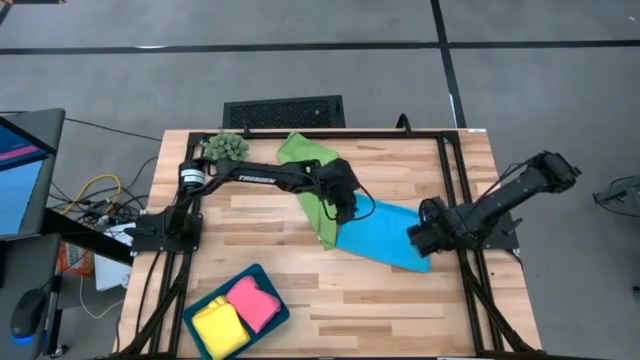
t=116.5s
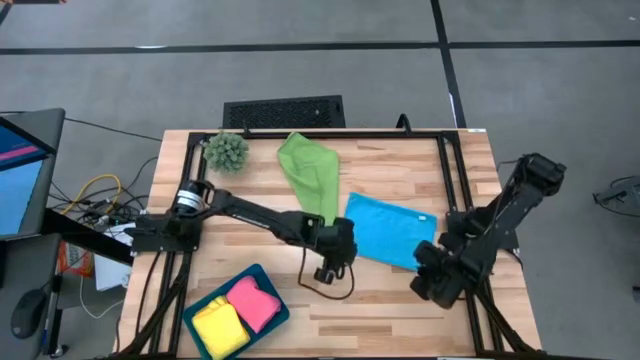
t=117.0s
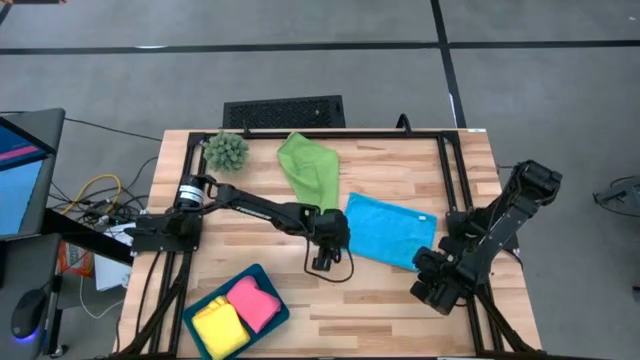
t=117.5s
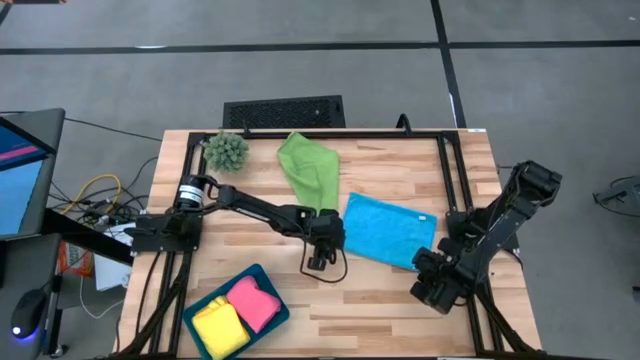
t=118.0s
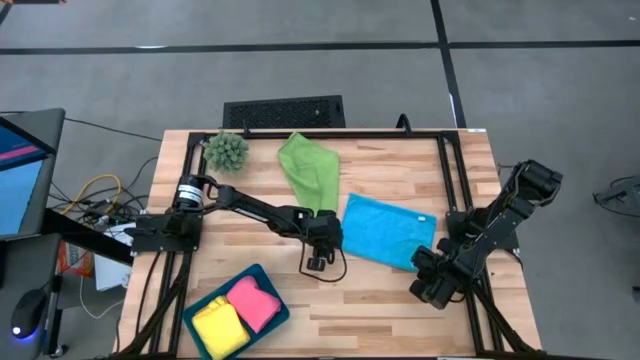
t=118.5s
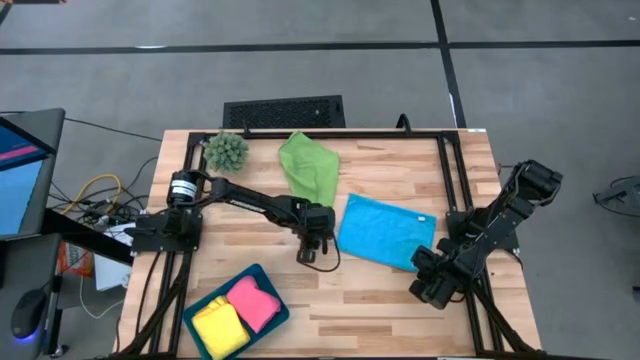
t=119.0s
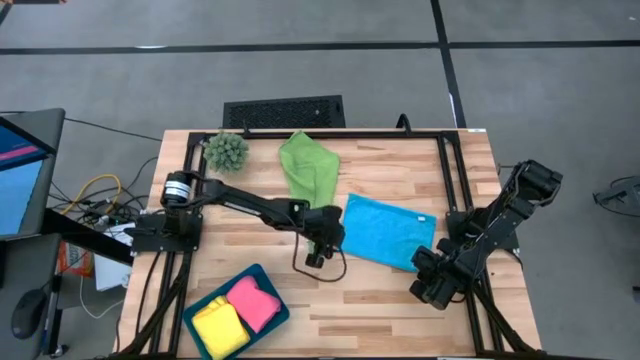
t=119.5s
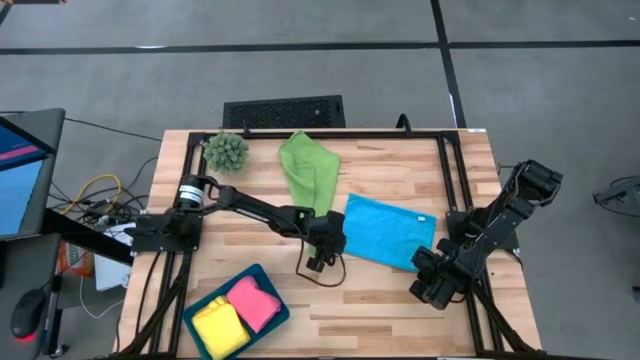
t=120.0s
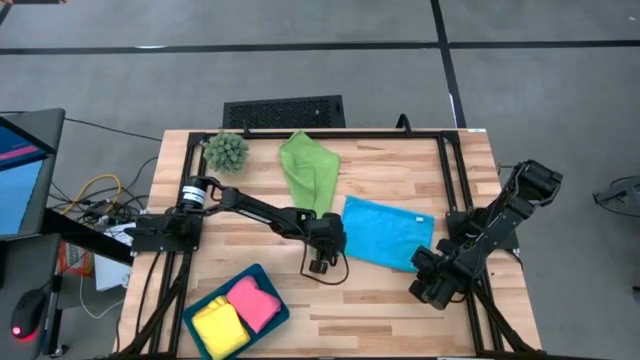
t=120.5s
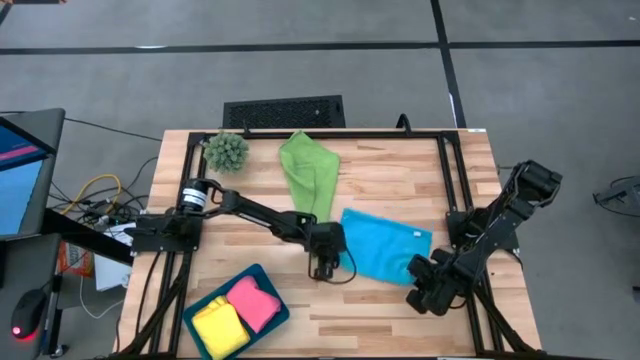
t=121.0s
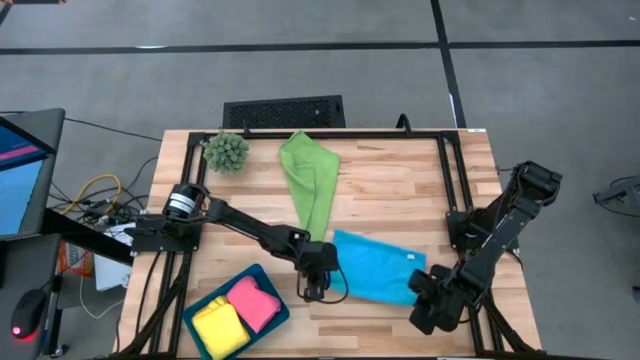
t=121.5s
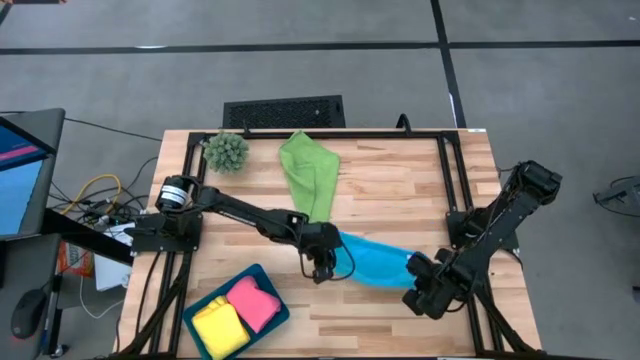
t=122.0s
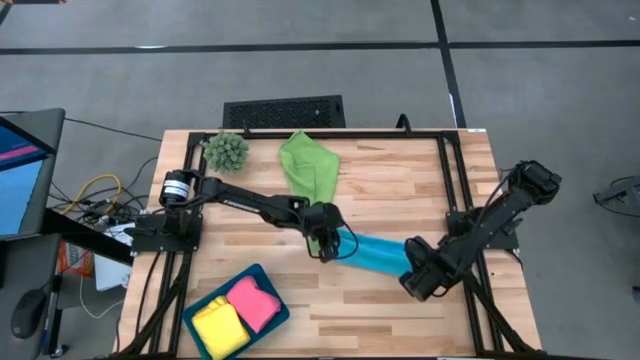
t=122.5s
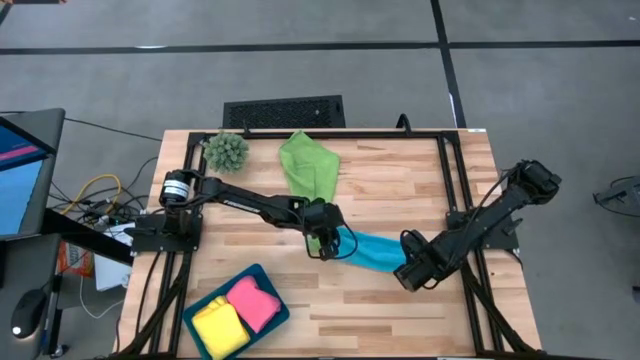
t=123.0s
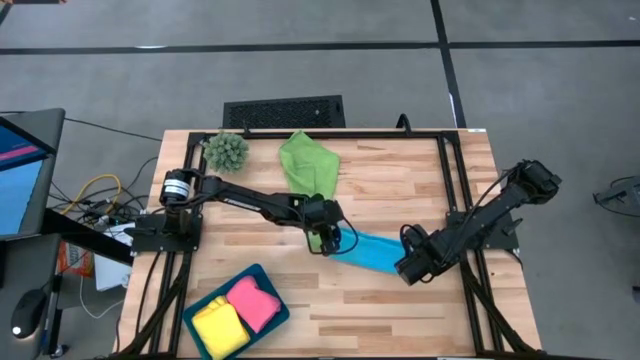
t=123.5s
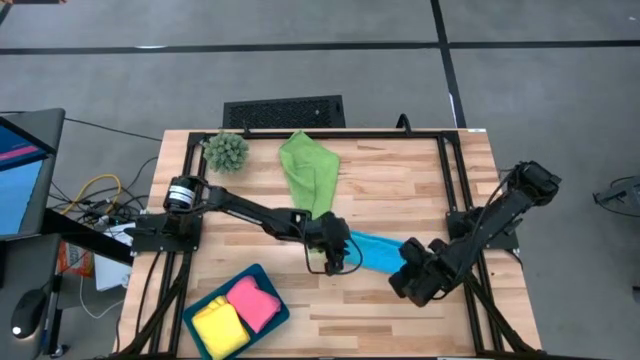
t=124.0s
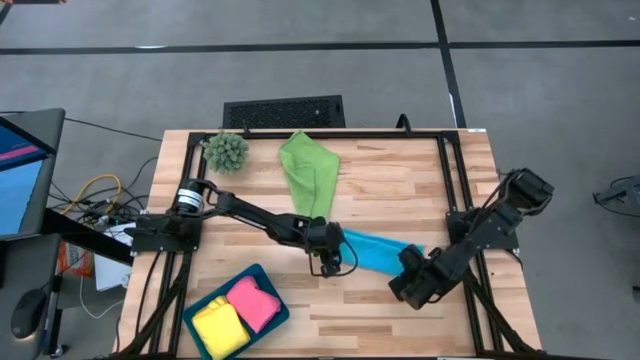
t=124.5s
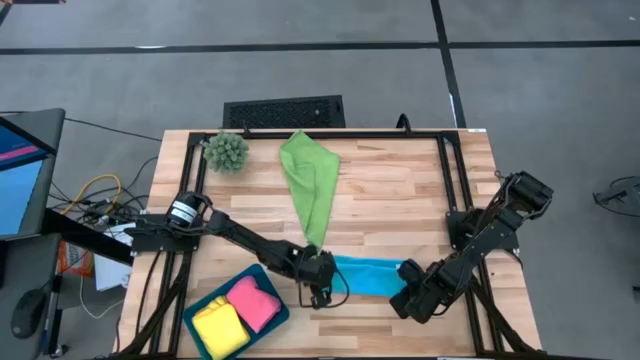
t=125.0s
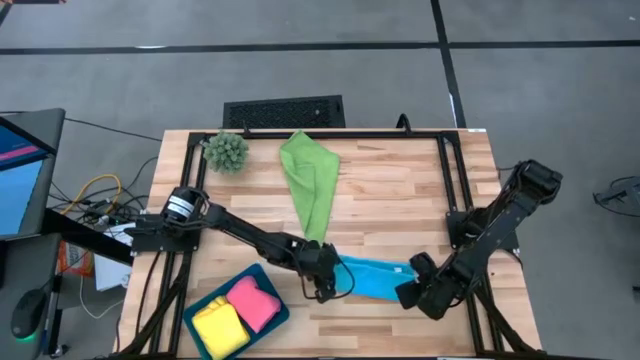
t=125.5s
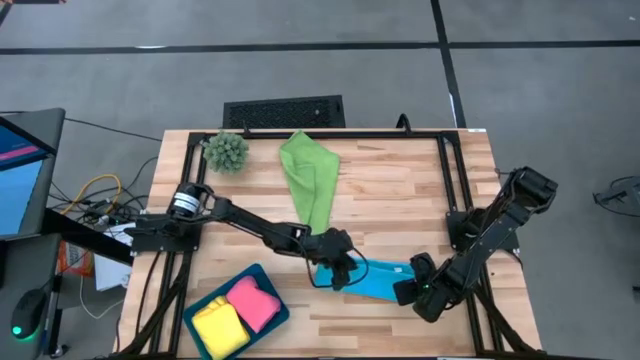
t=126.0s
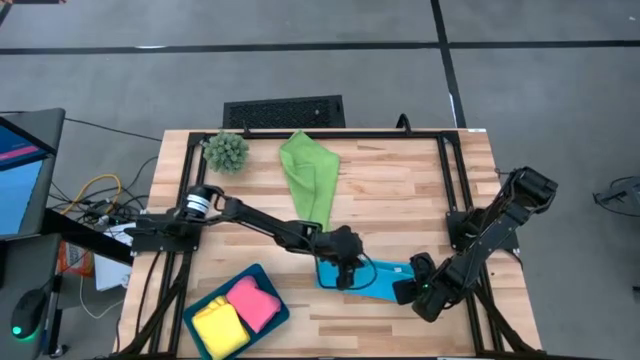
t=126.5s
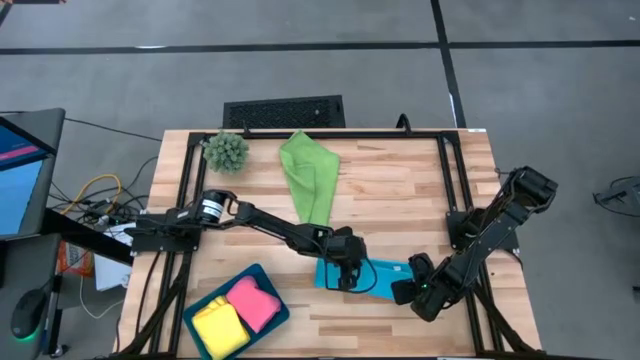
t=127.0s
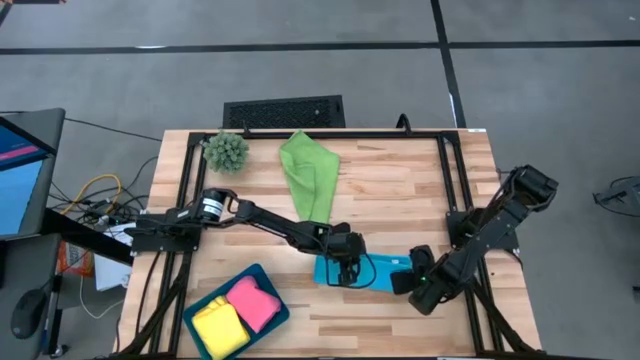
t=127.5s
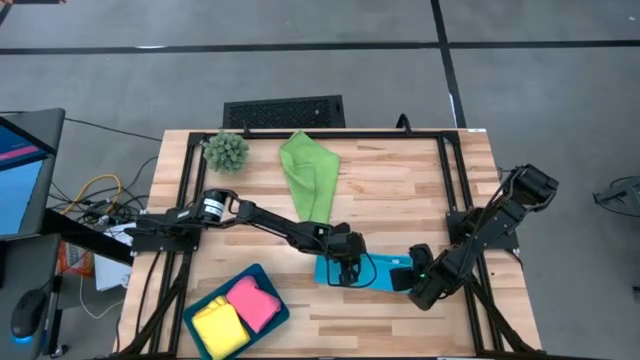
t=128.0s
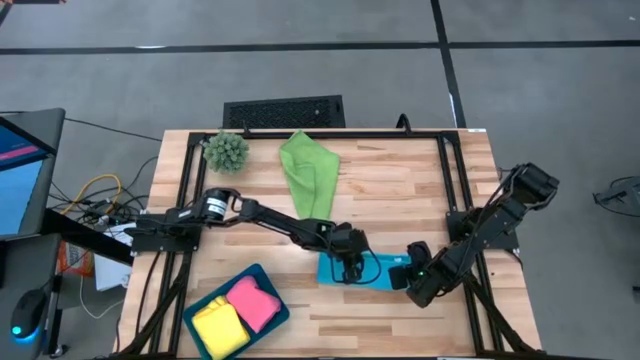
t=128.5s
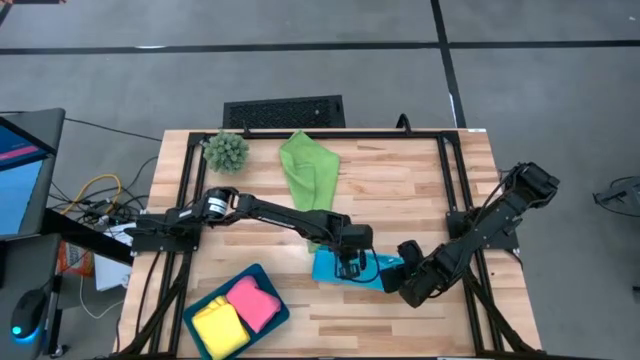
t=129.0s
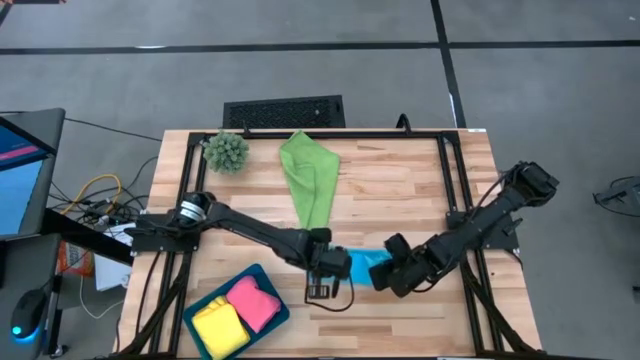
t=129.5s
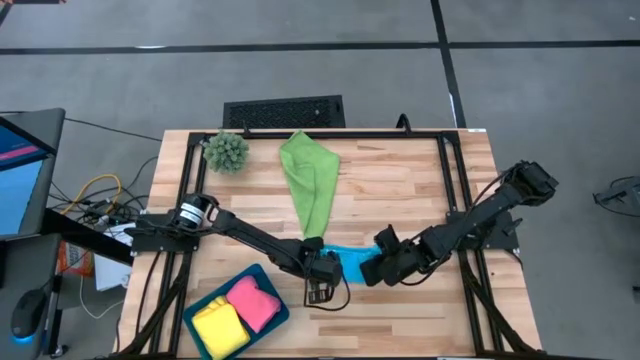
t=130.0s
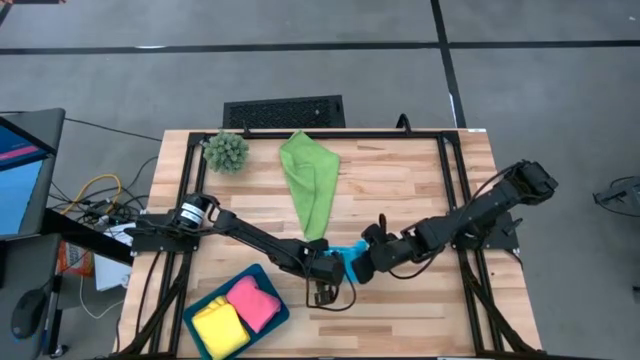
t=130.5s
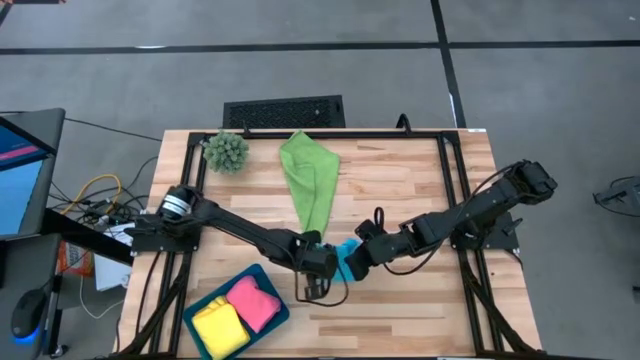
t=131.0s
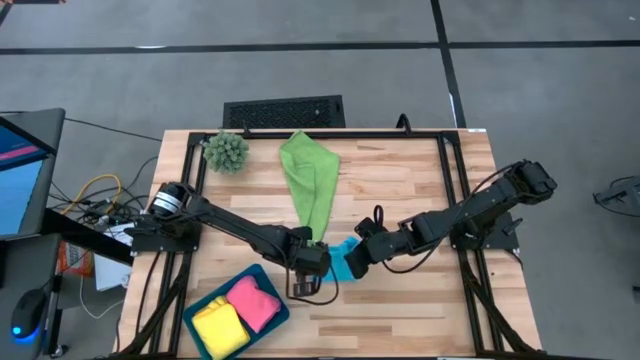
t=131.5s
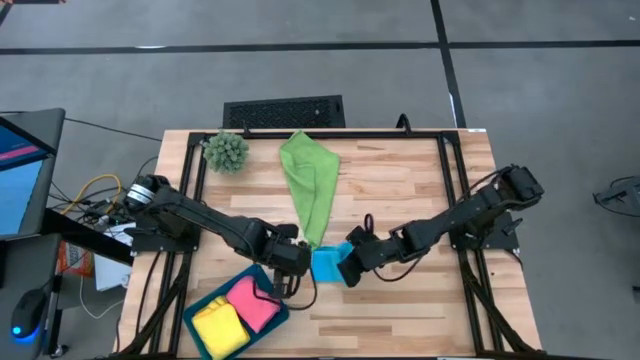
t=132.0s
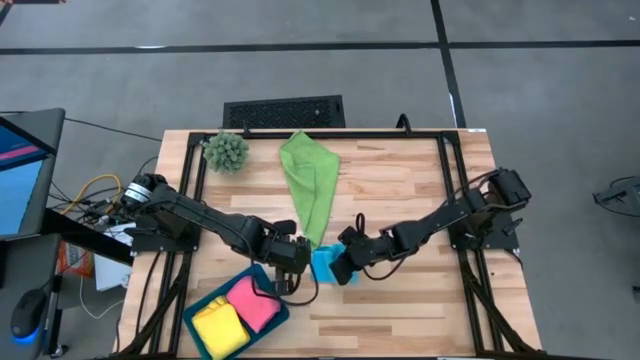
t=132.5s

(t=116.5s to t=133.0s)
Task: Fold microfiber towels
Fold the blue microfiber towel

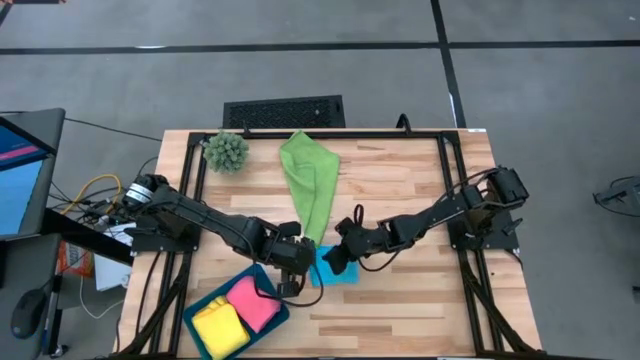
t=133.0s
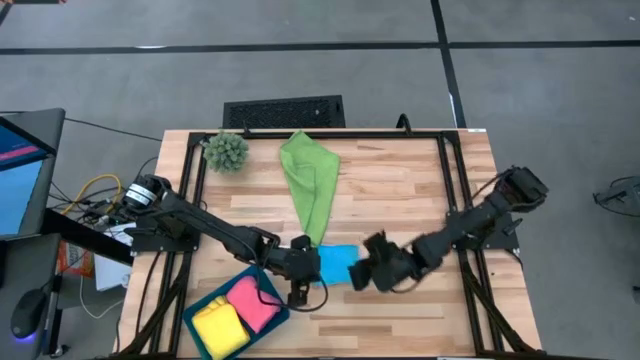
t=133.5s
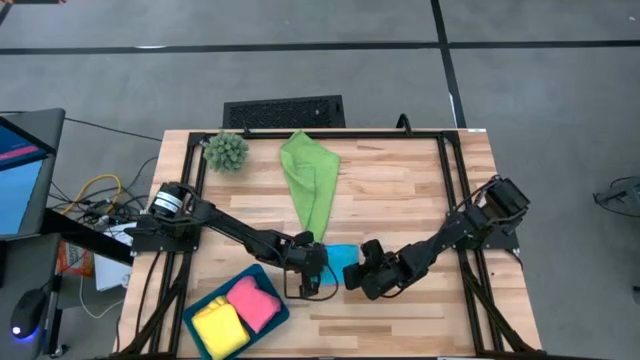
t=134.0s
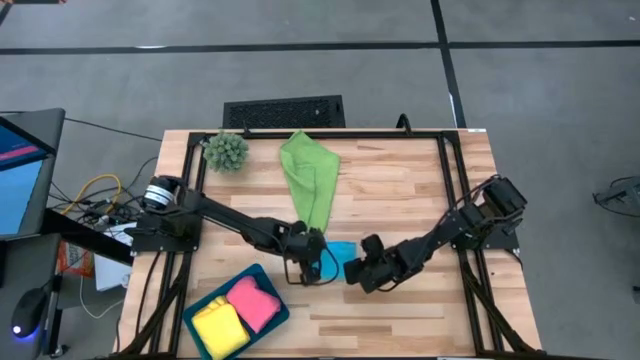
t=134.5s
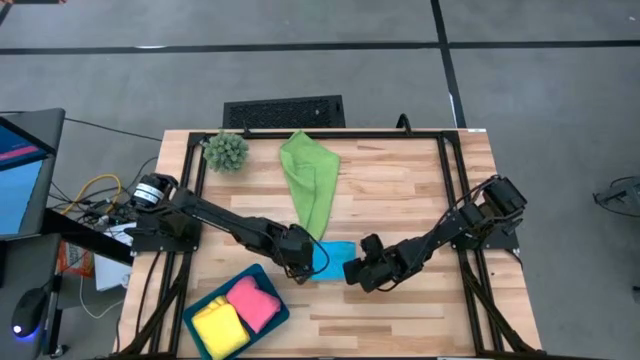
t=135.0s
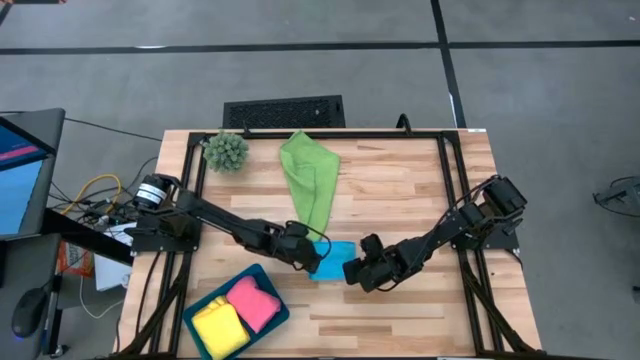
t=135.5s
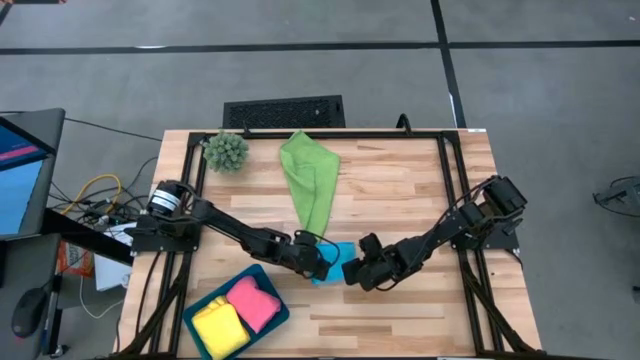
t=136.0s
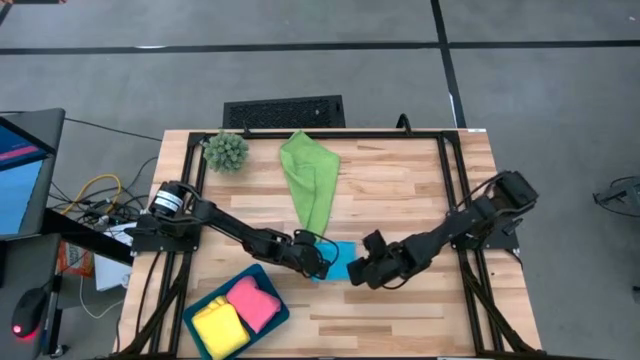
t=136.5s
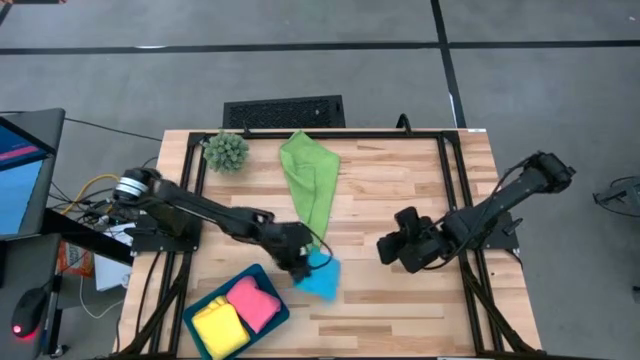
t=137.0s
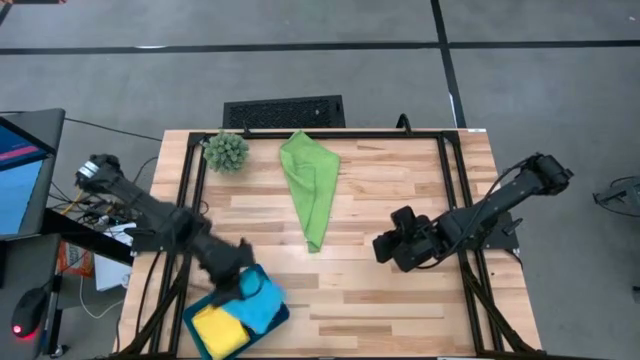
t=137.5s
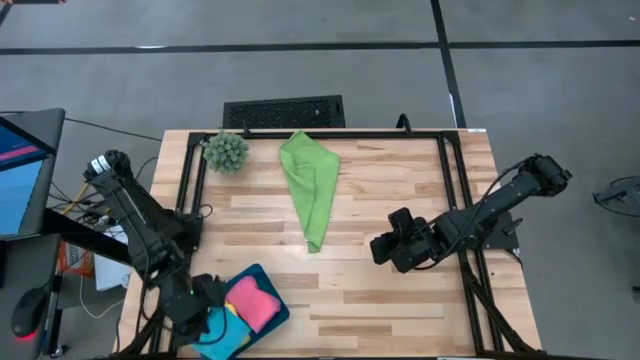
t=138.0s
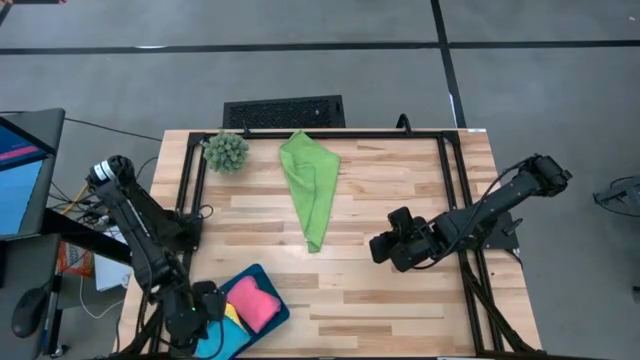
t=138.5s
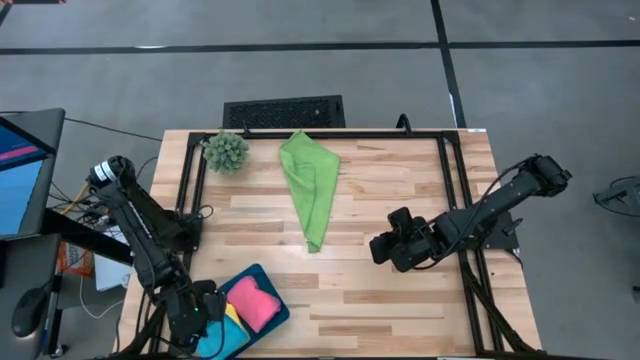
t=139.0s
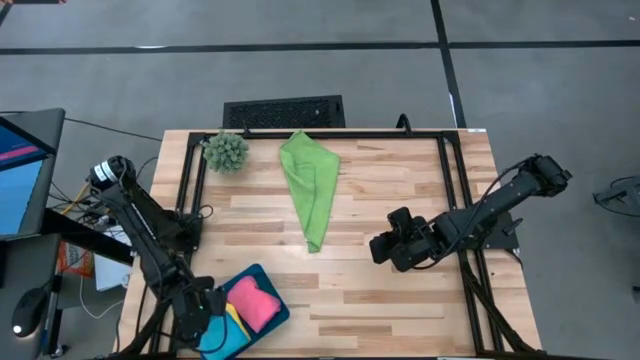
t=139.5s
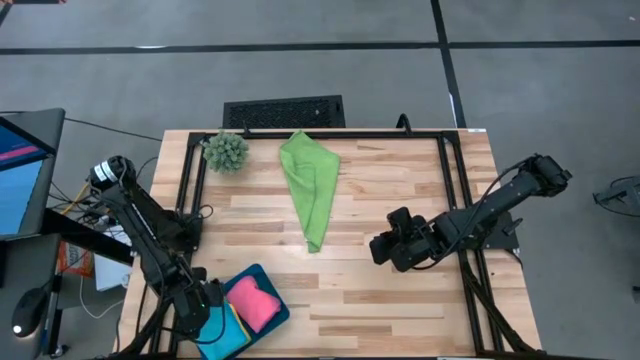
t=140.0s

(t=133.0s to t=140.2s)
Put the blue microfiber towel into the bin
